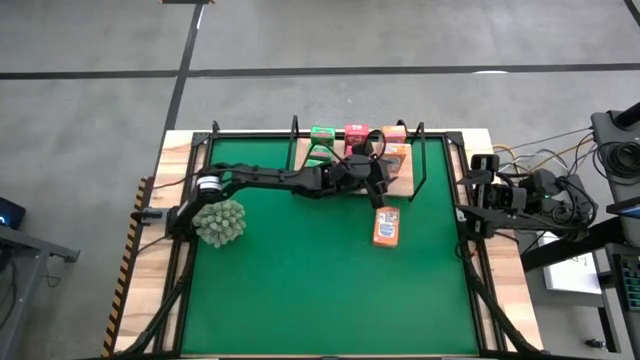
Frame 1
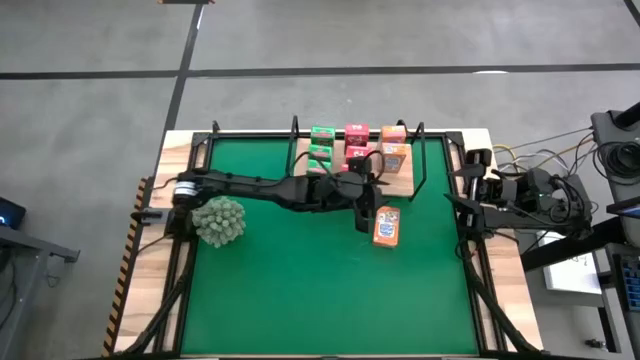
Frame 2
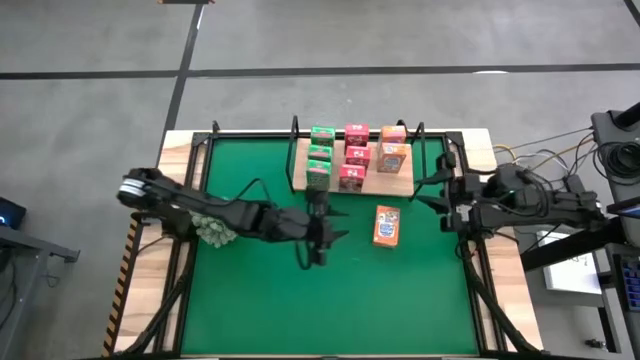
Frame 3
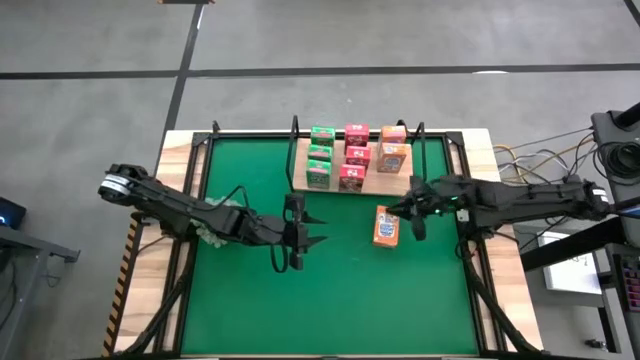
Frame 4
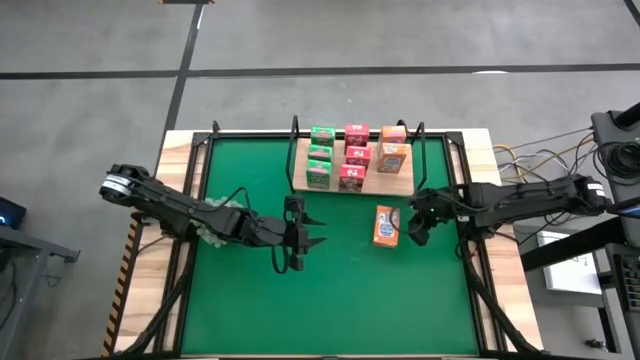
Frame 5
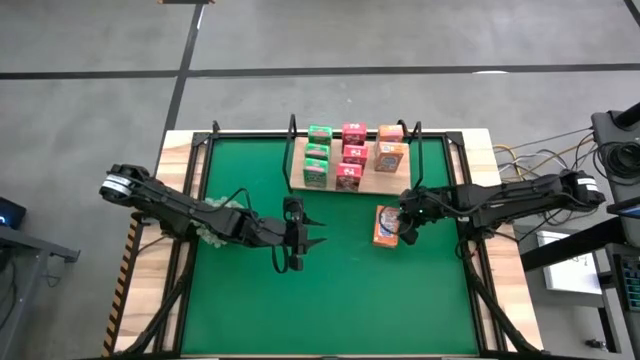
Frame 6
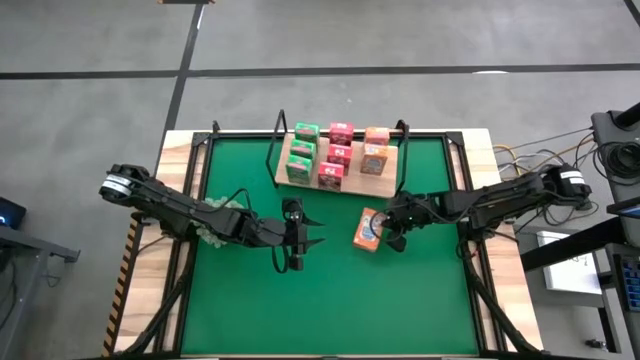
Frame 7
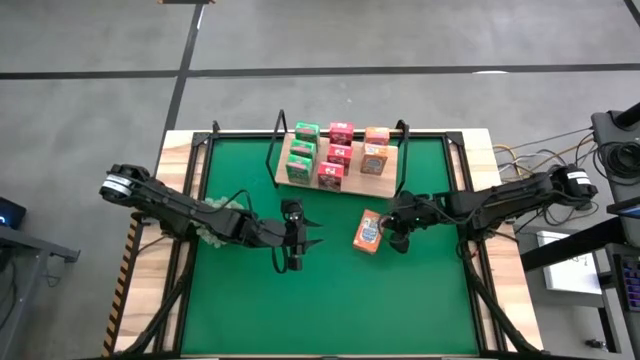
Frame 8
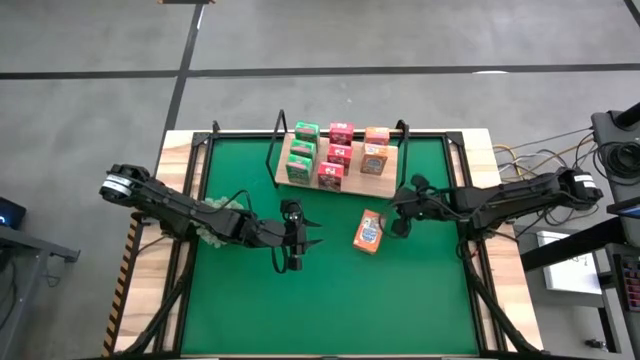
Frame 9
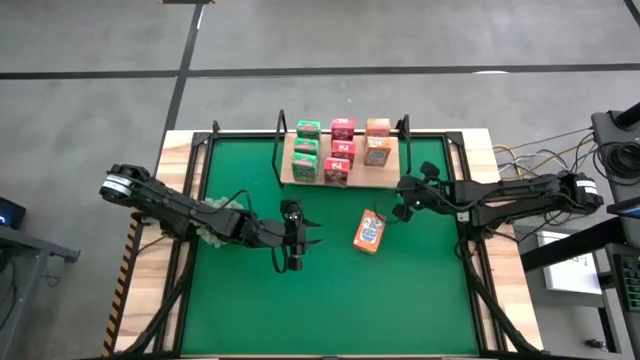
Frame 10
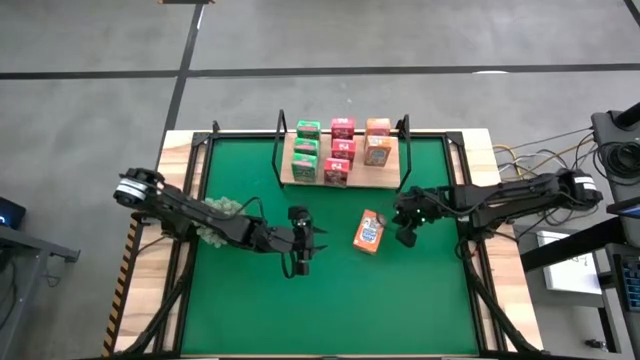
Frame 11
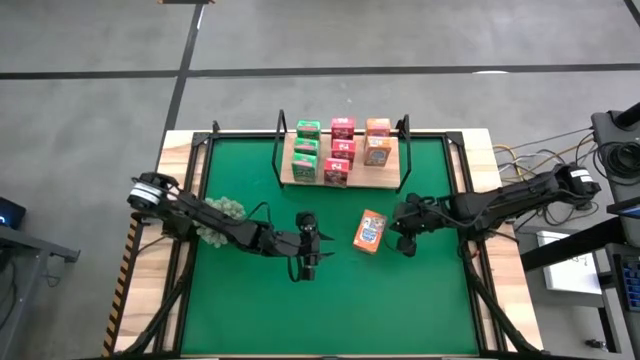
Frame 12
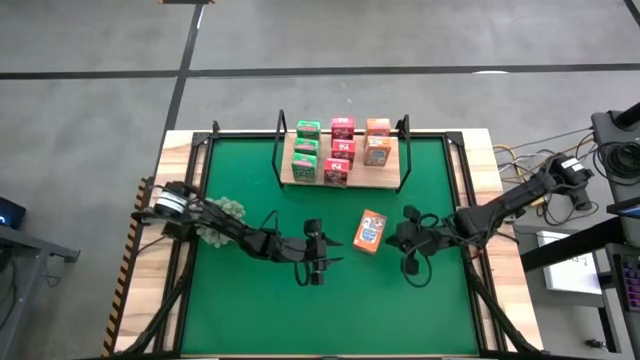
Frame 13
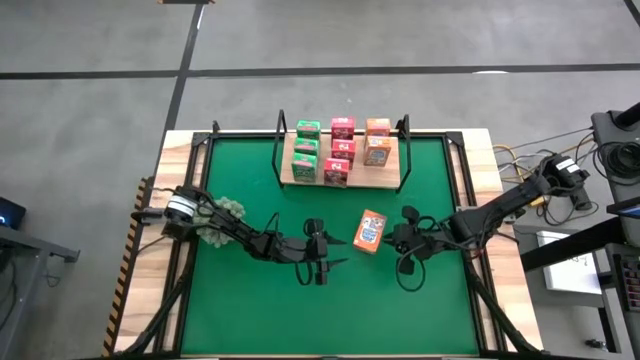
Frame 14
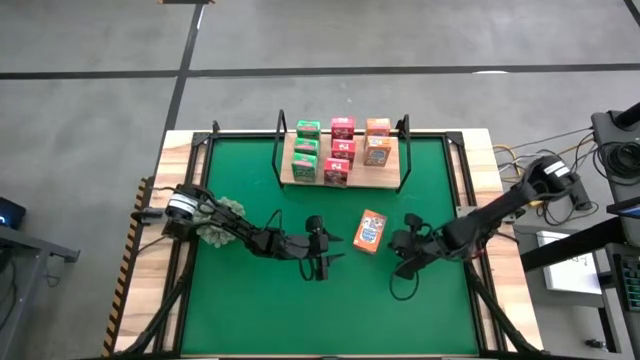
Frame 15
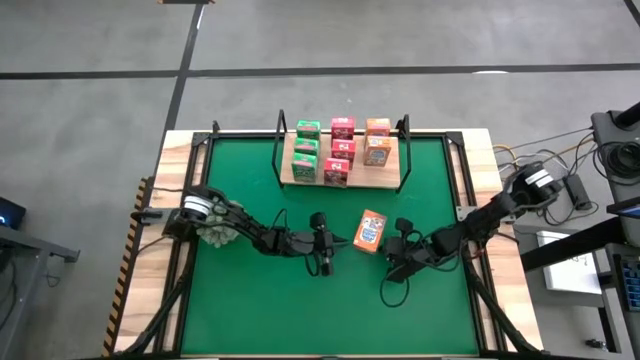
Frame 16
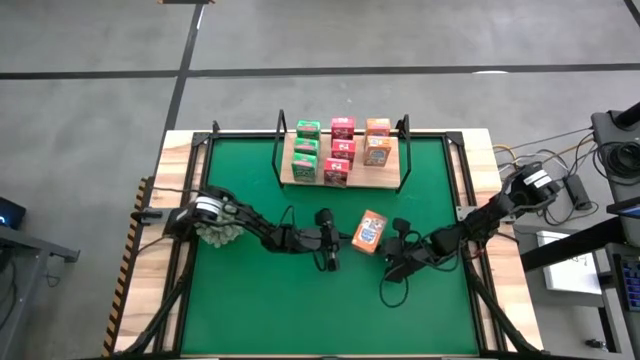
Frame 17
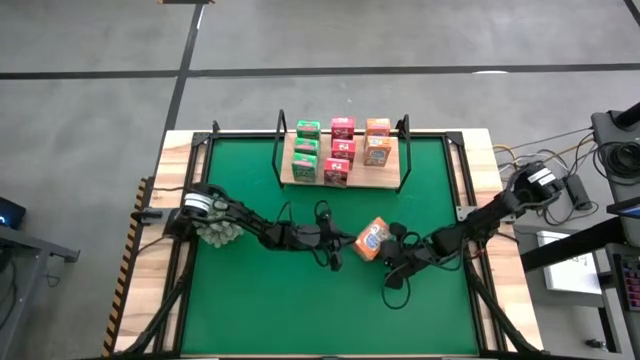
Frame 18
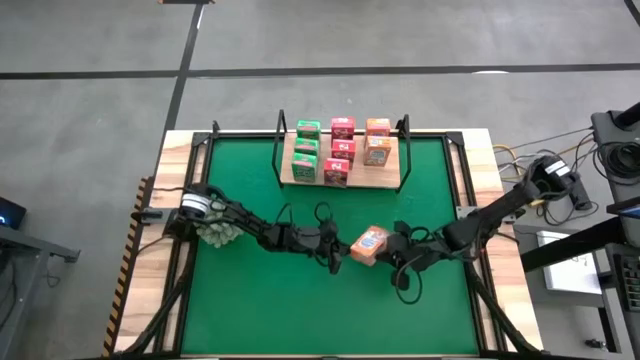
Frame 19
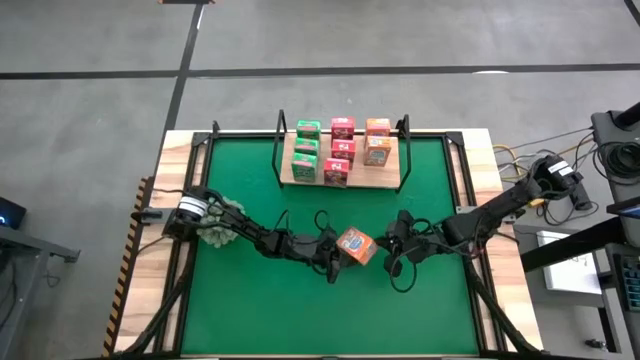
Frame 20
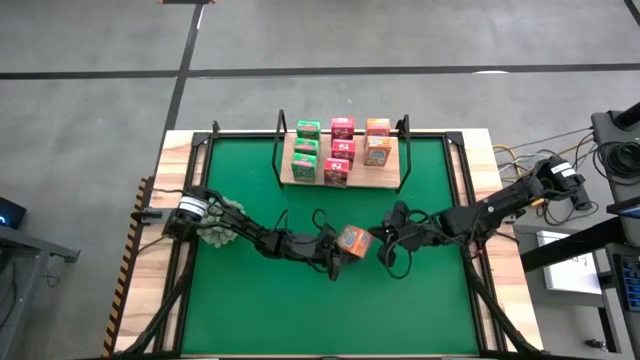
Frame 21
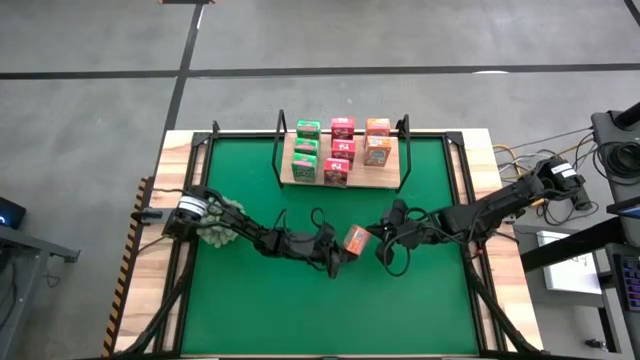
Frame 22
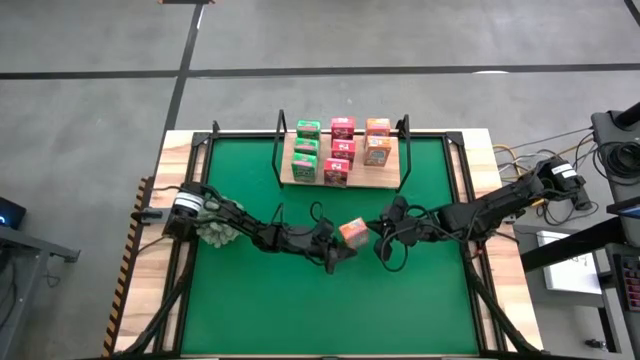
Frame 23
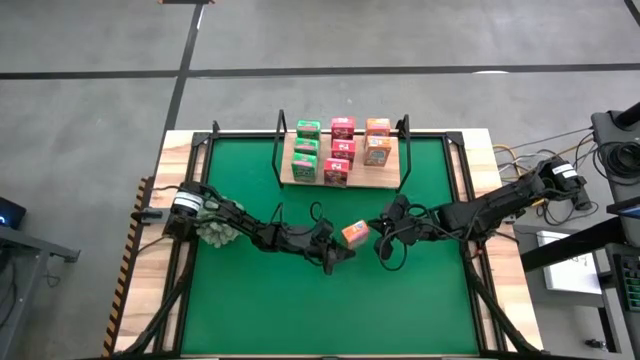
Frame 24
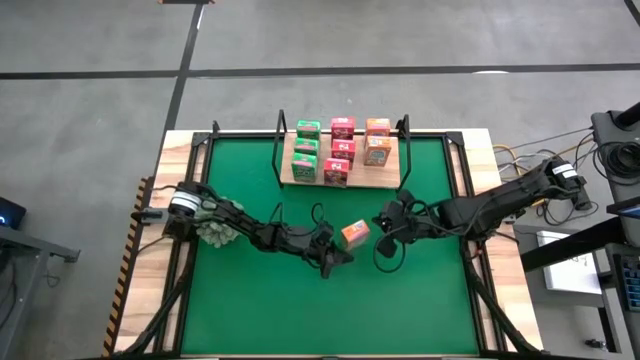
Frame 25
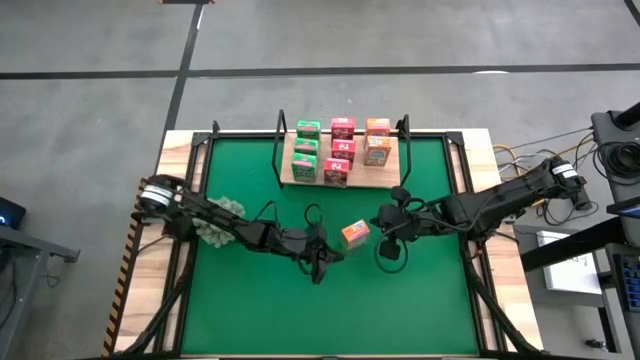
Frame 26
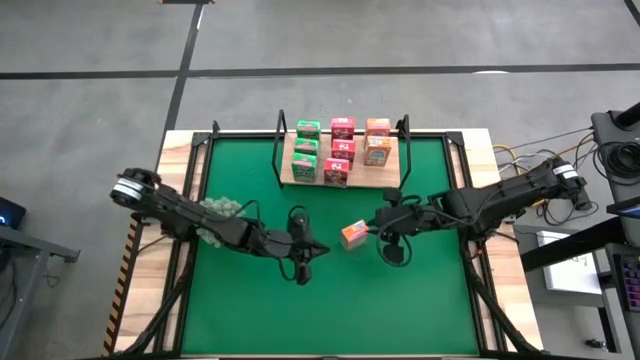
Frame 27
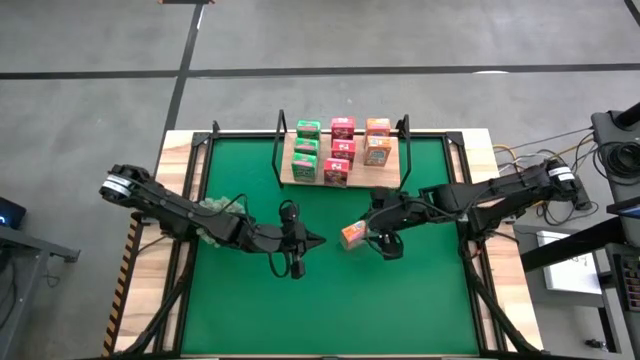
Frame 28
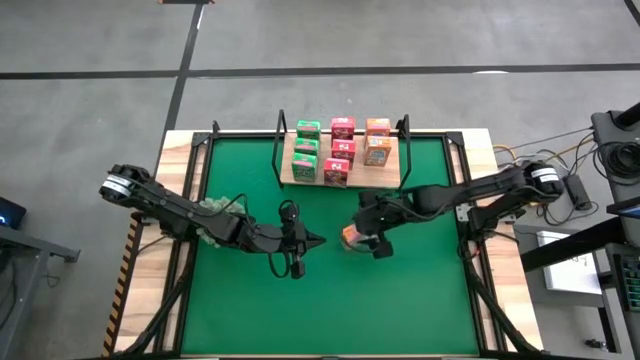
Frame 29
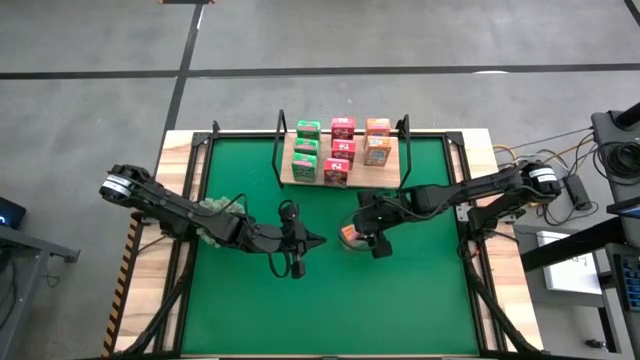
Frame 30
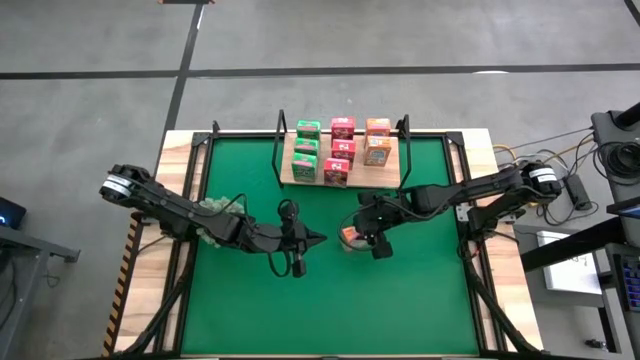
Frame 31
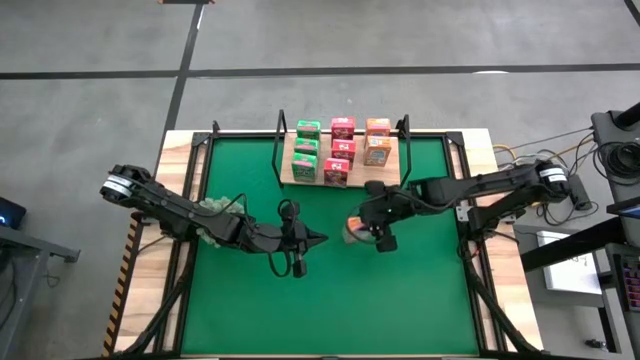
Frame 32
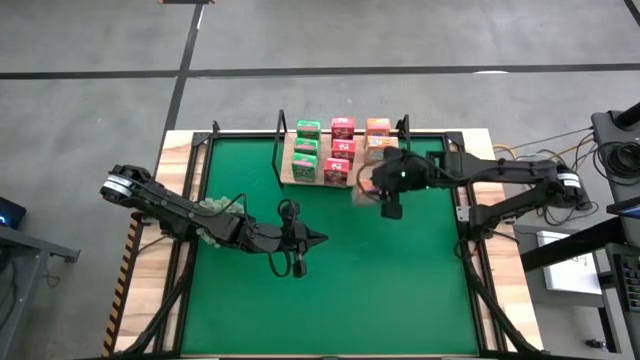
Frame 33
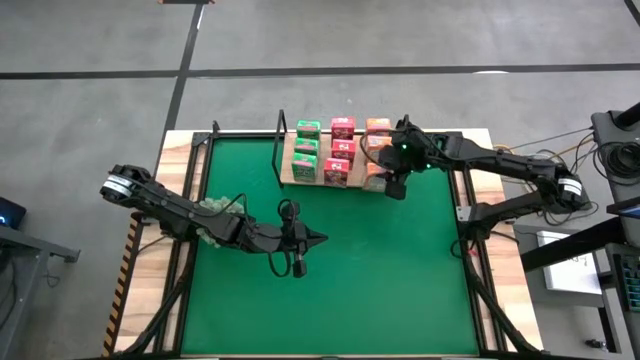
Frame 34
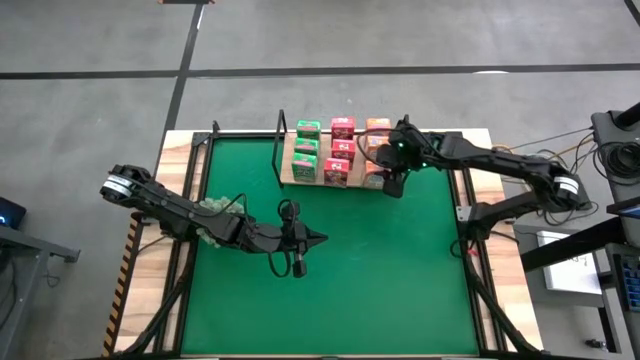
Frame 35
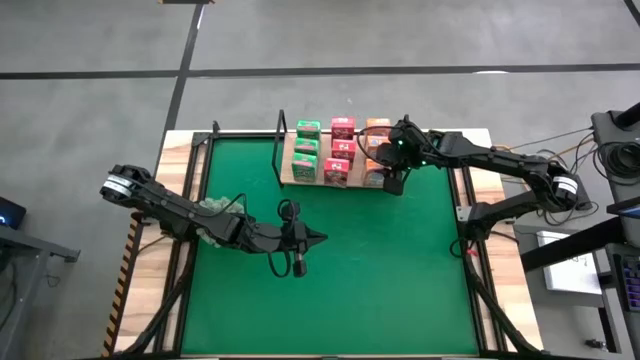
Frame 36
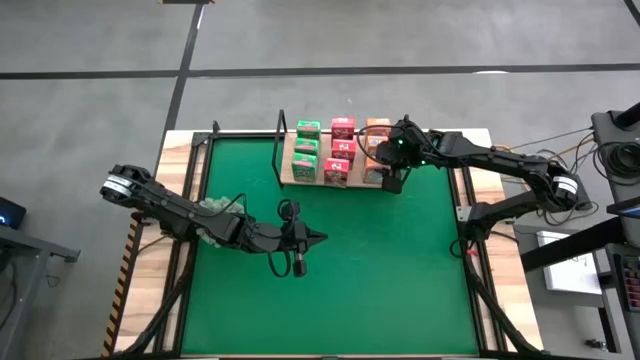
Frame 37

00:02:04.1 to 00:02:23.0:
Task: Stack cereal on shelf
Put the orange cereal box on the shelf aligned with the other orange cereal boxes

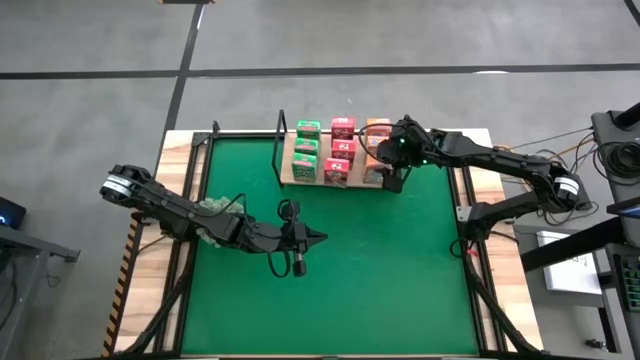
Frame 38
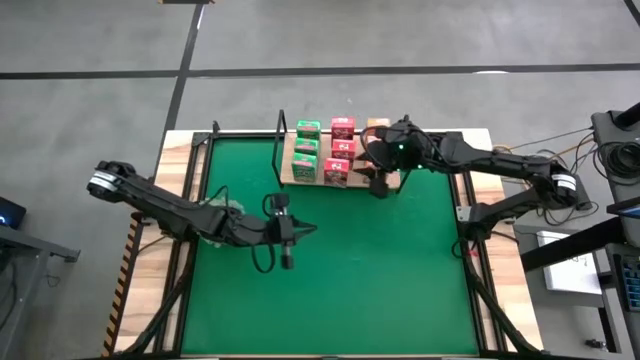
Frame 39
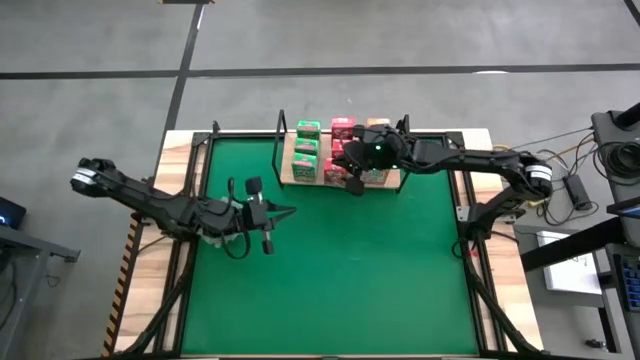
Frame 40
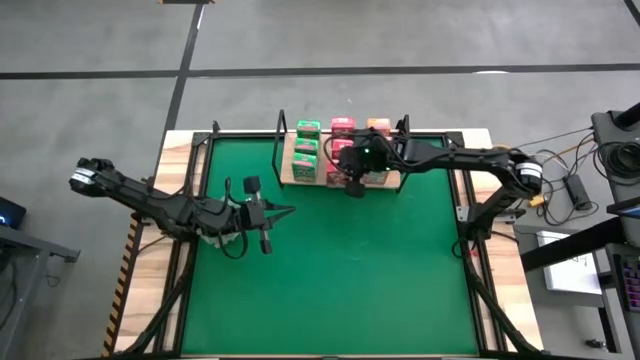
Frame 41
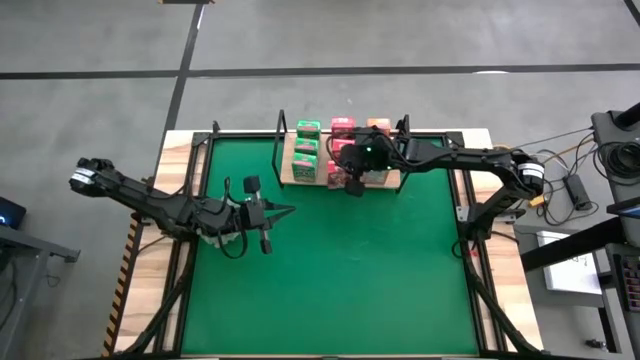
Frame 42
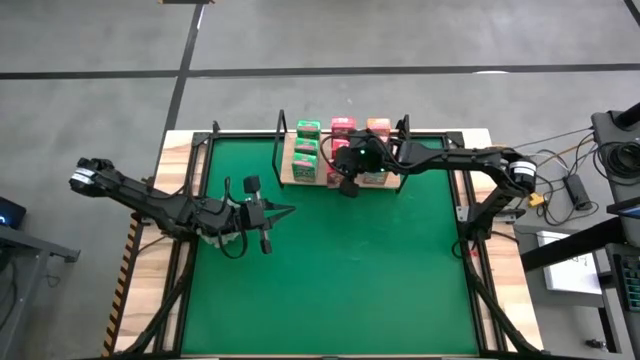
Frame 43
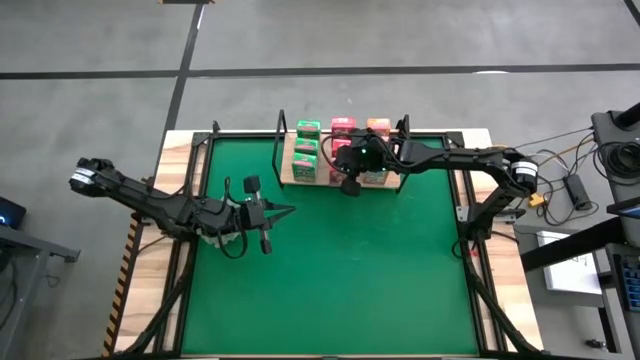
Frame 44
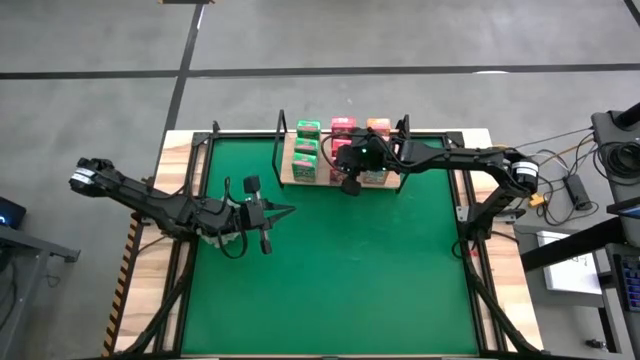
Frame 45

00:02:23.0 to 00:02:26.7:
Adjust the red cereal box on the shelf
